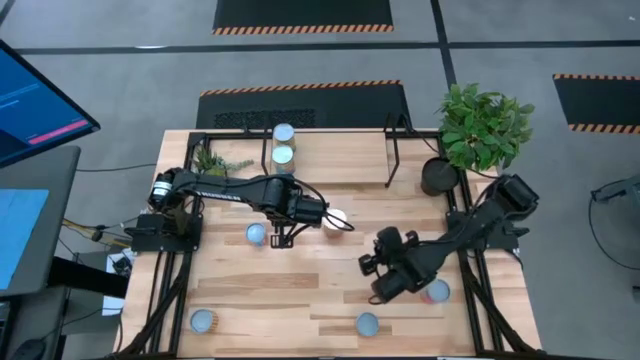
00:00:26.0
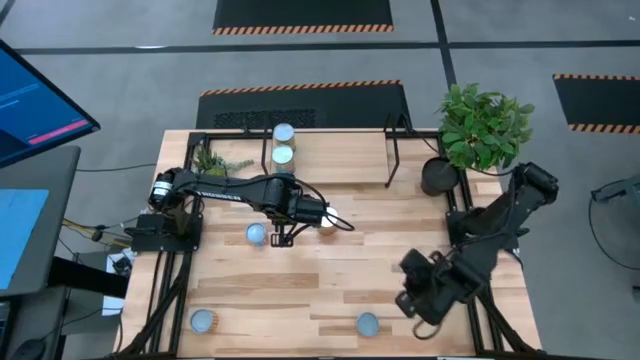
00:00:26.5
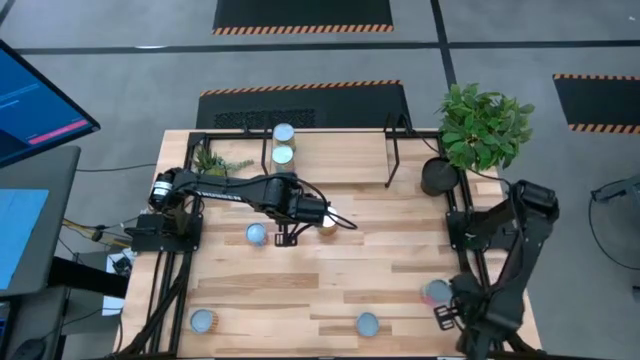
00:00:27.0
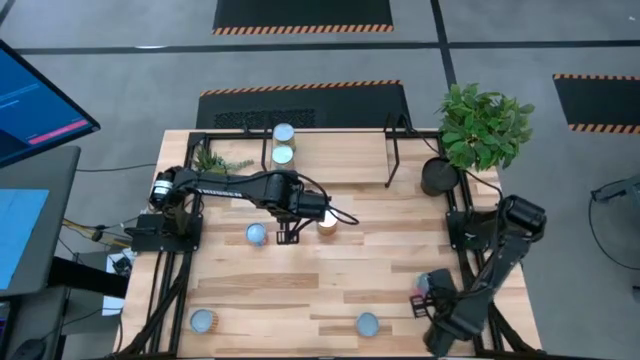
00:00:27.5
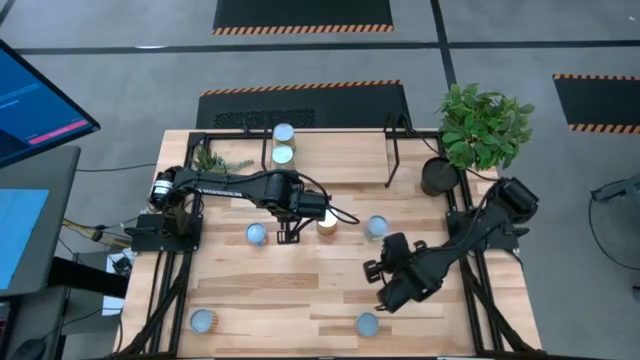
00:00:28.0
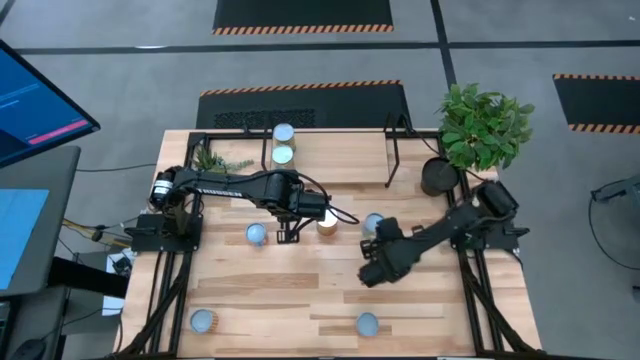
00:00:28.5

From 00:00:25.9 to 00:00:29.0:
Task: Pick and place cans onto a shelf
Move the canned chicken soup on the middle of the table

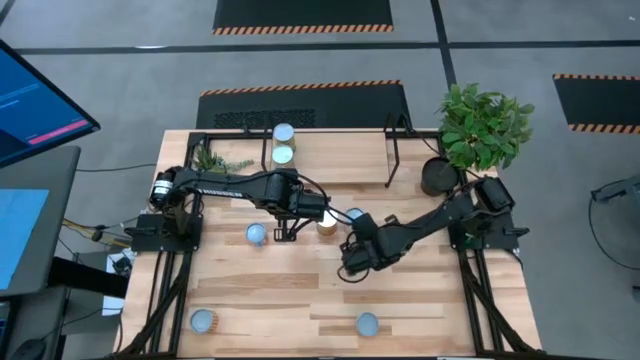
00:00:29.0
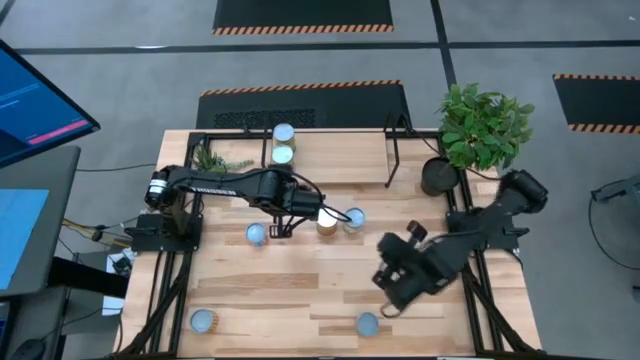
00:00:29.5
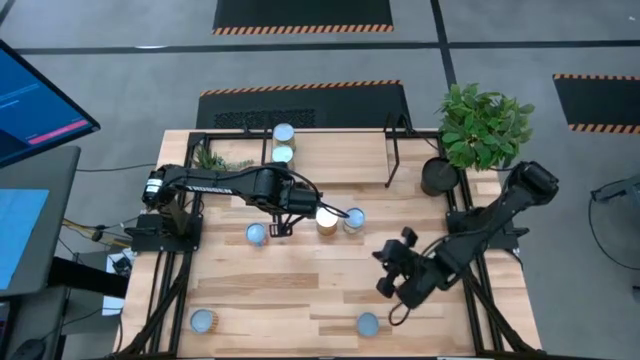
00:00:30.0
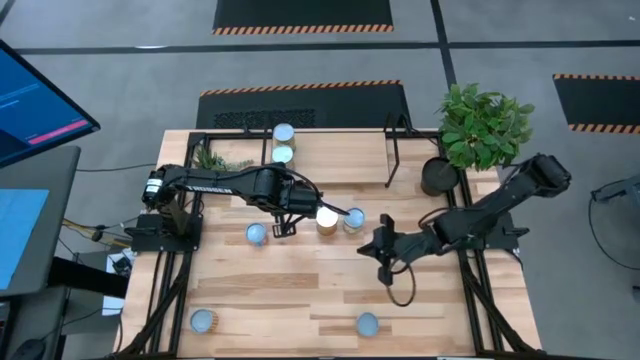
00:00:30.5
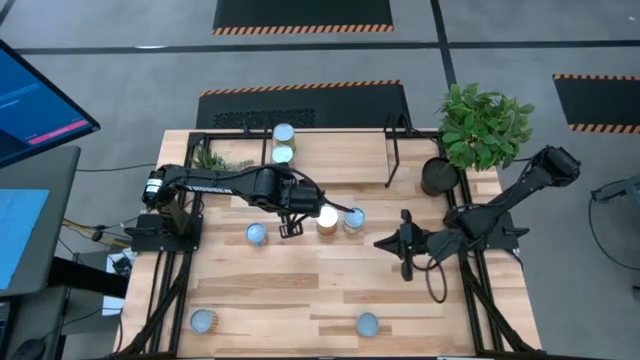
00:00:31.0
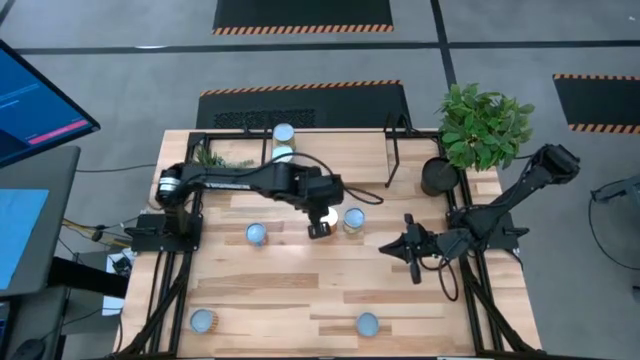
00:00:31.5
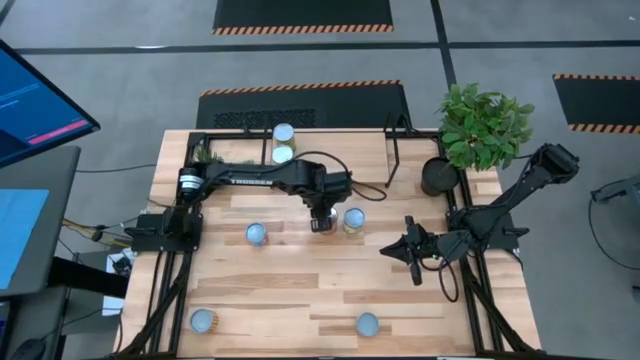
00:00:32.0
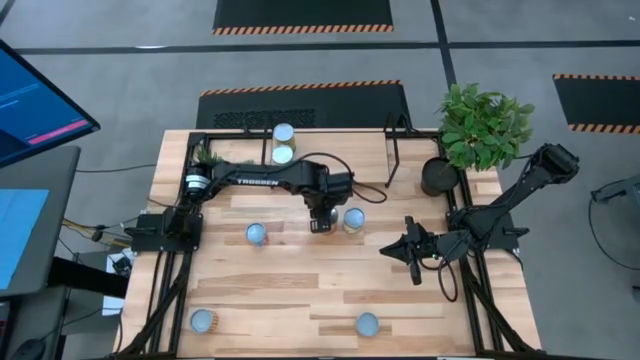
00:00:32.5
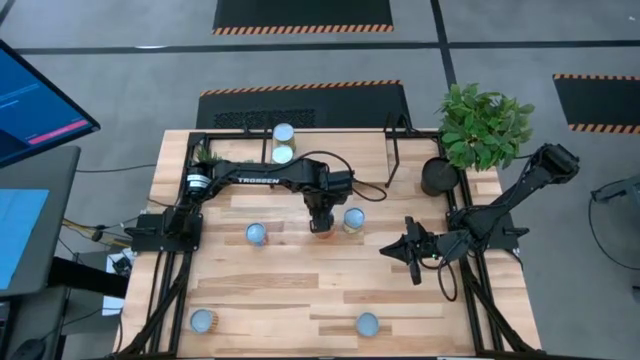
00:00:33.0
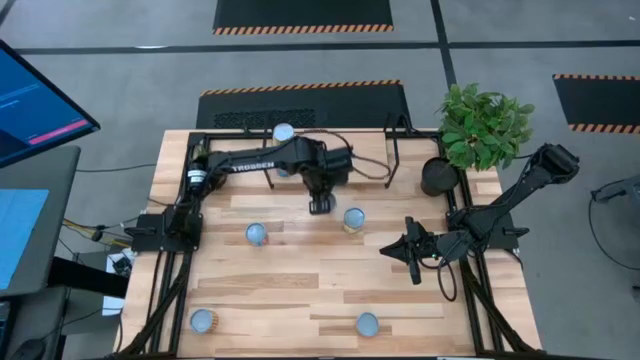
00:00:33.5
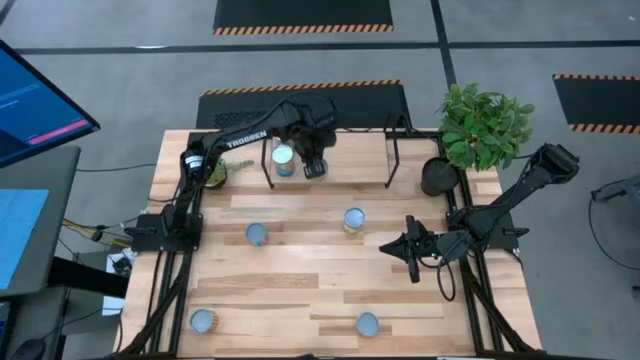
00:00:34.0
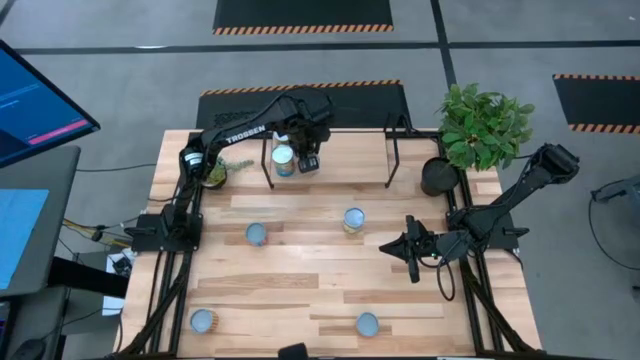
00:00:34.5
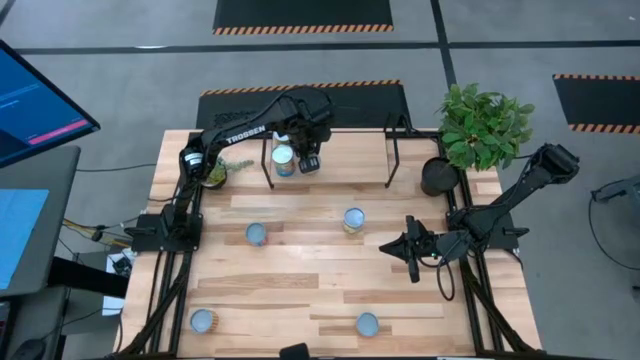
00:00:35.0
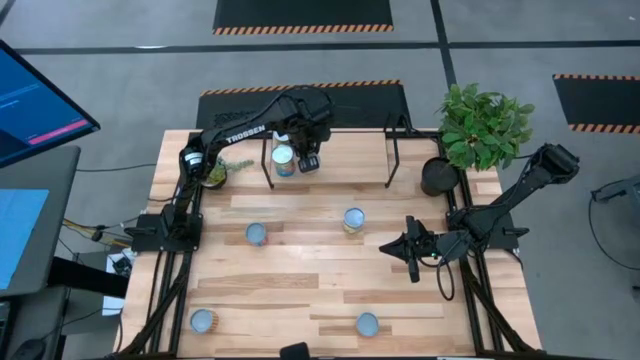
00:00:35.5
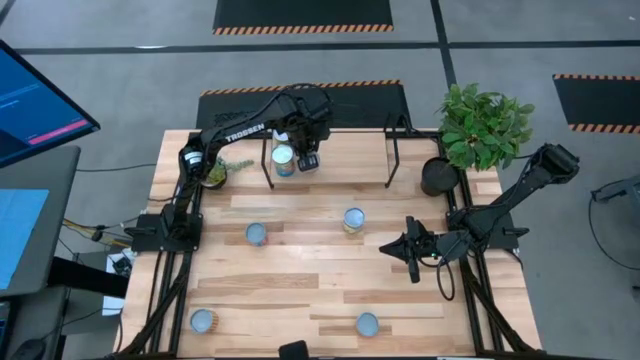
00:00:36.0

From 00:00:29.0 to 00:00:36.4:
Put the canned green peas on the shelf

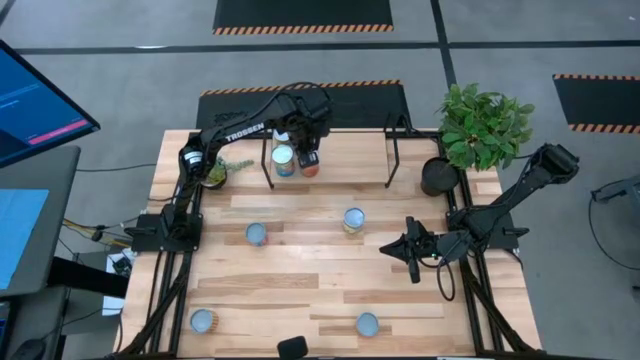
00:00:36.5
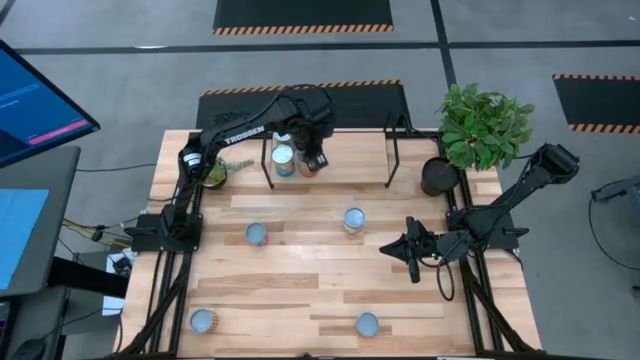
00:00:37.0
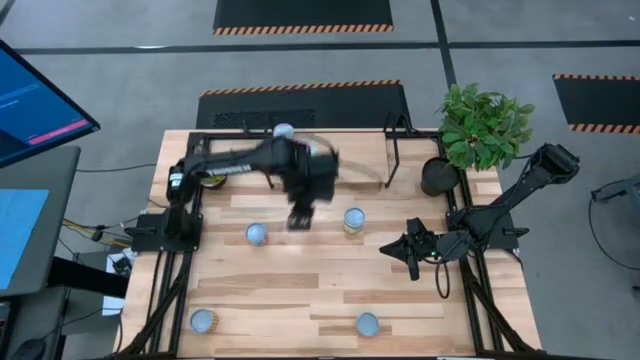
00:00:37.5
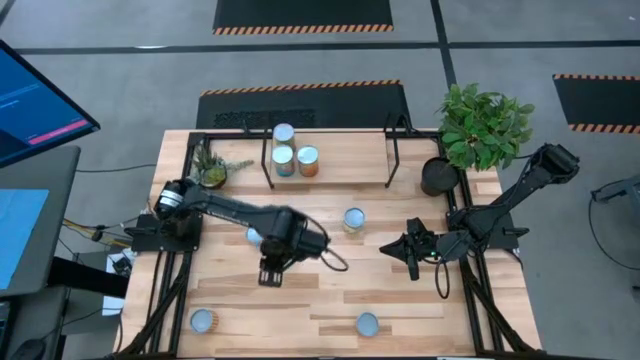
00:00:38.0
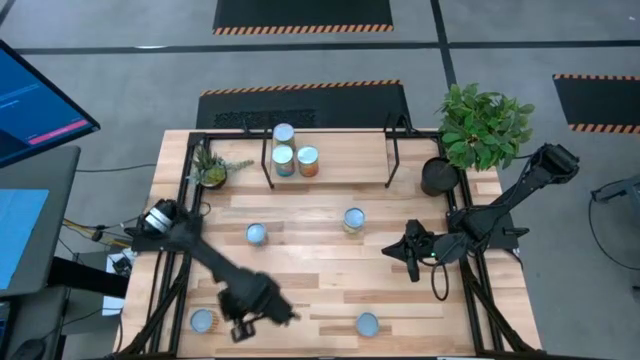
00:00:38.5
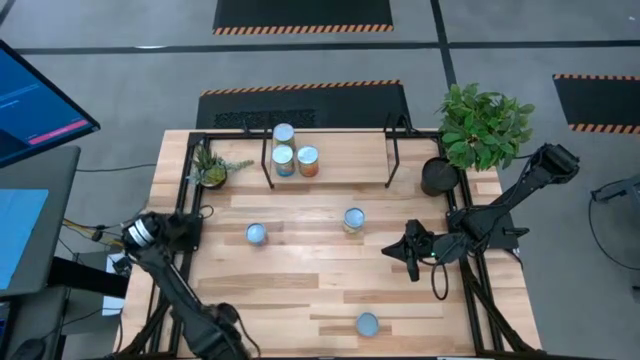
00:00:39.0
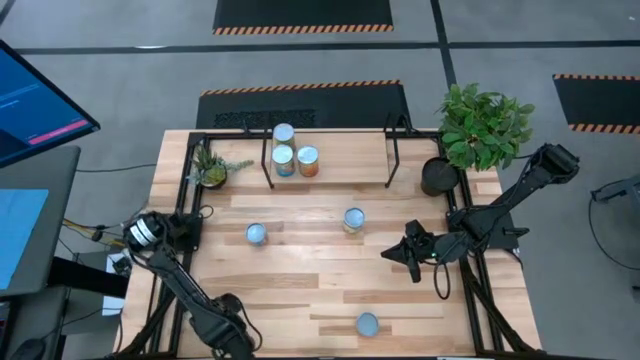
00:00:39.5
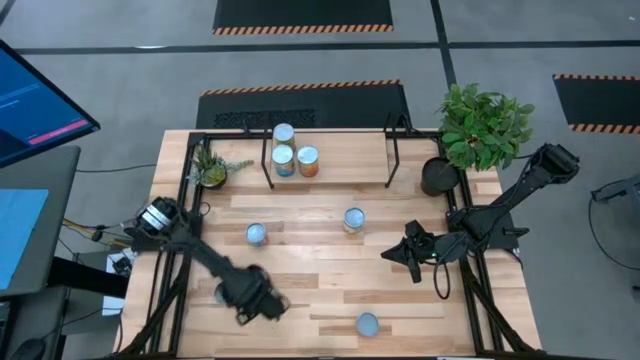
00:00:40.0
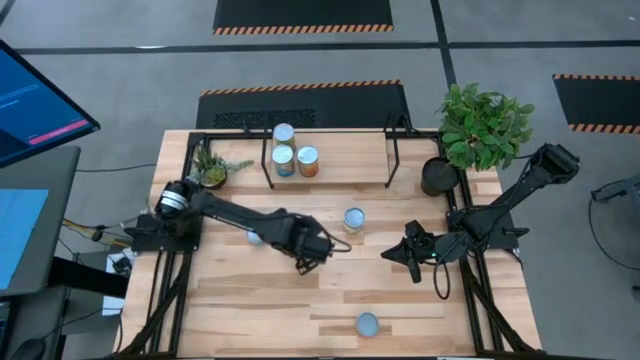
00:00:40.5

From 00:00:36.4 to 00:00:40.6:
Move the canned peppers on the middle of the table

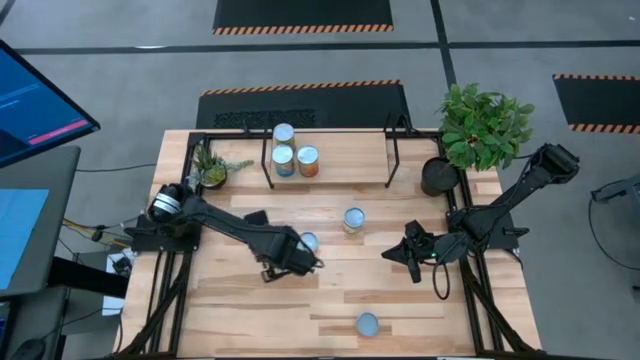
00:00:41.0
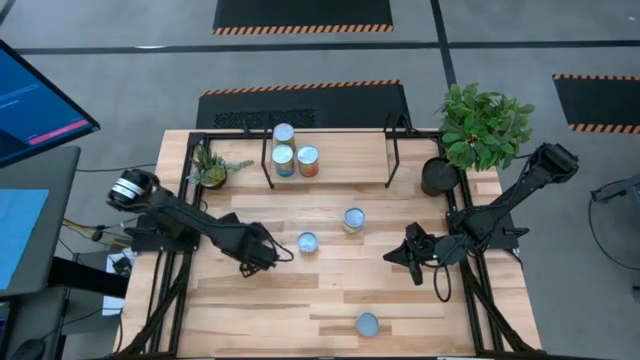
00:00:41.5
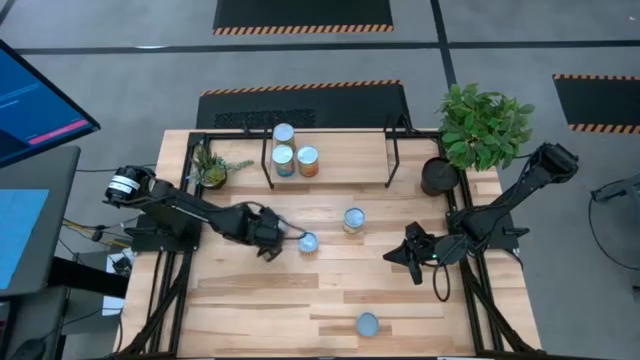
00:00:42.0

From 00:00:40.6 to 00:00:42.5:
Move the canned corn on the middle of the table

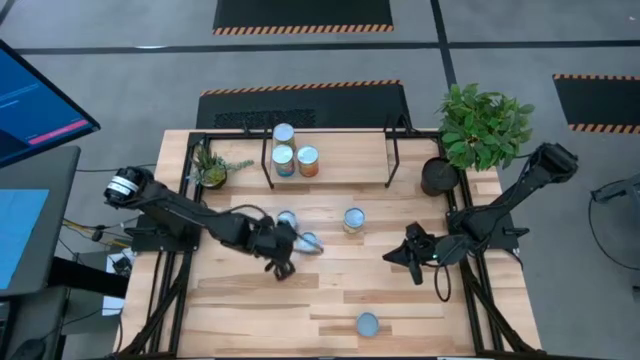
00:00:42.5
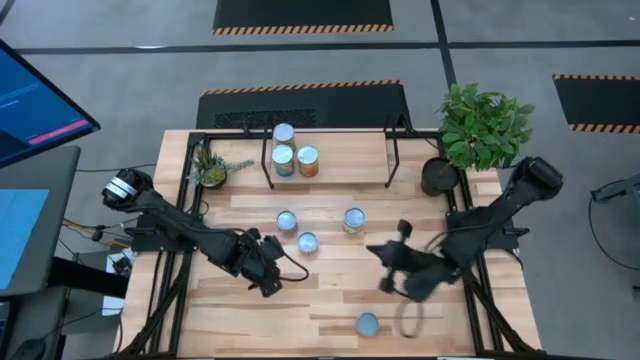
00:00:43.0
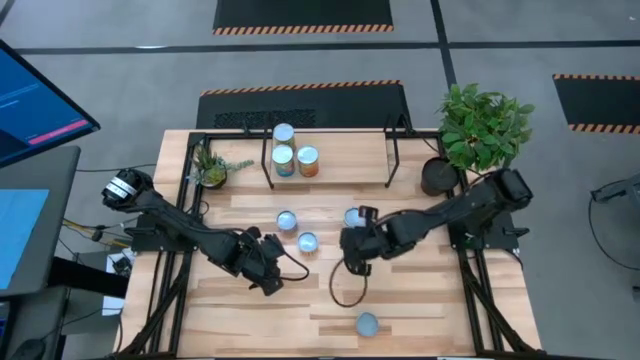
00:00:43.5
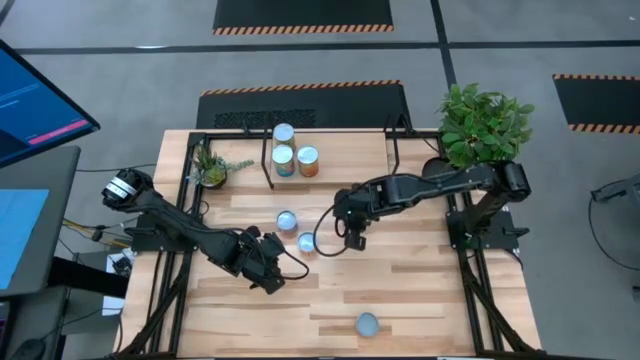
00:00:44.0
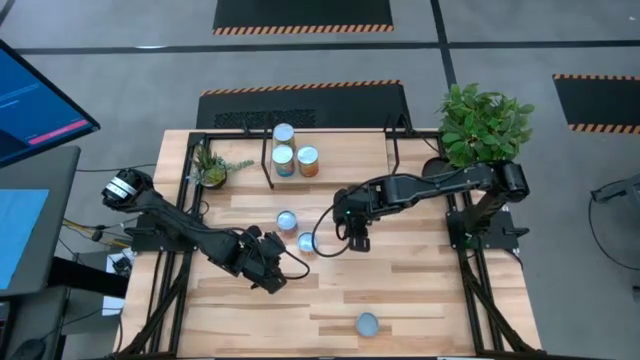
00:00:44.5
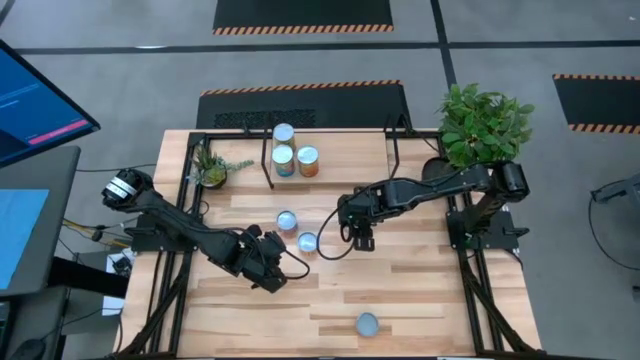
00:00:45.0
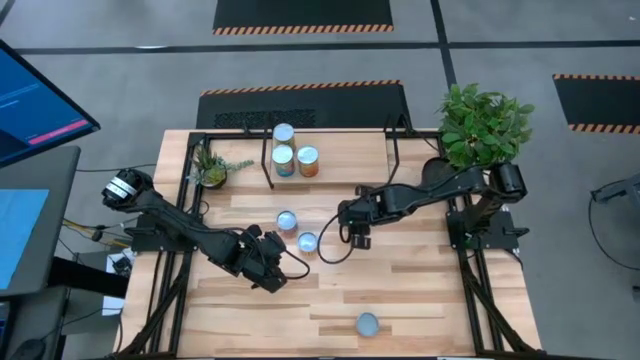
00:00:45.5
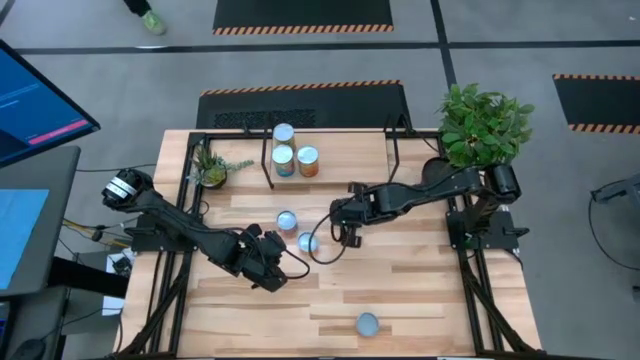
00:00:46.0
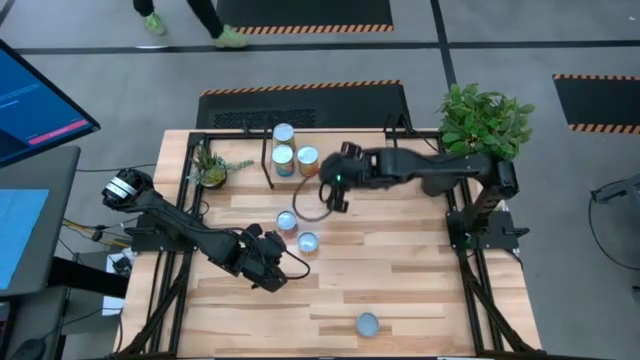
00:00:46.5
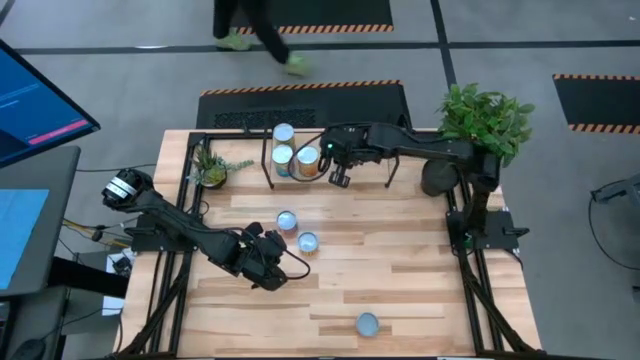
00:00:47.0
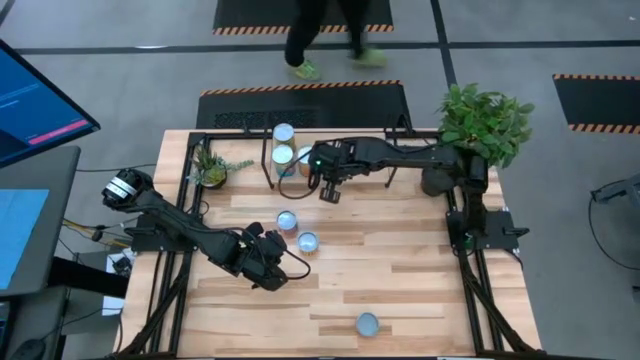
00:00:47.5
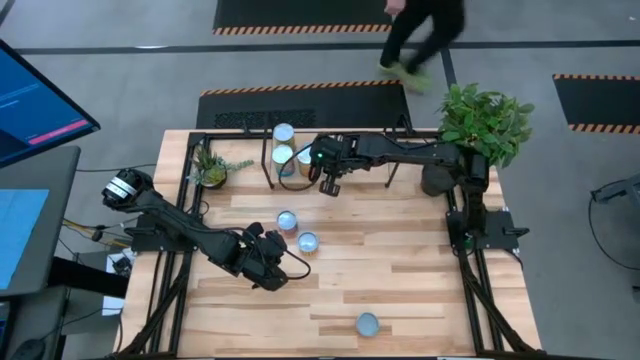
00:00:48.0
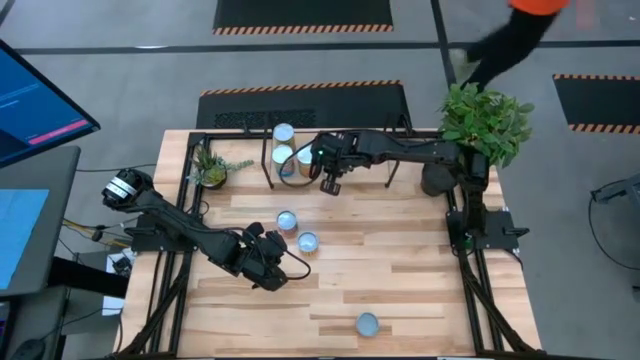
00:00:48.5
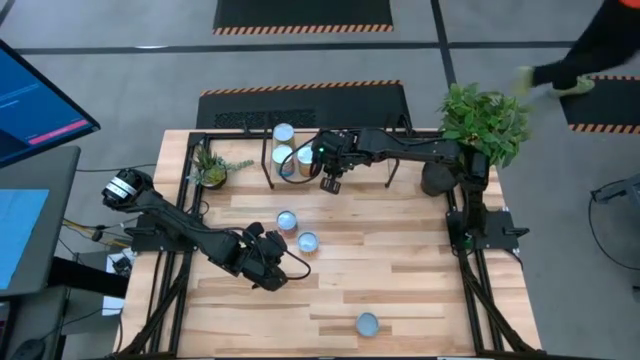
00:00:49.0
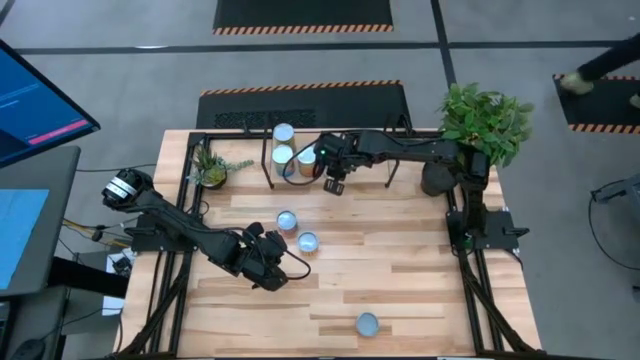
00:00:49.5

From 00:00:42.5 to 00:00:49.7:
Put the canned chicken soup on the shelf
